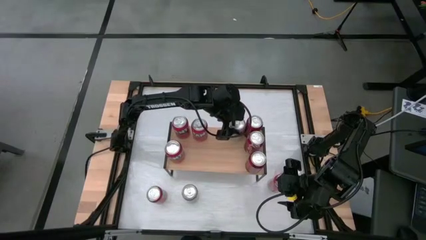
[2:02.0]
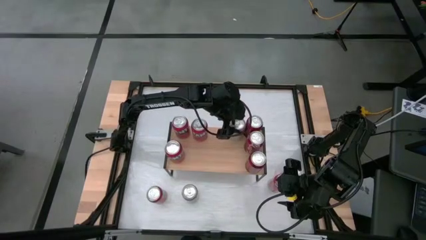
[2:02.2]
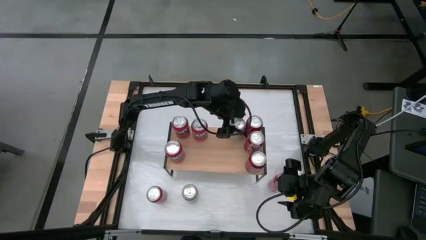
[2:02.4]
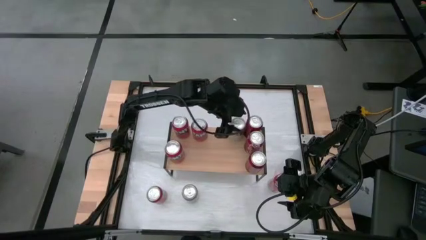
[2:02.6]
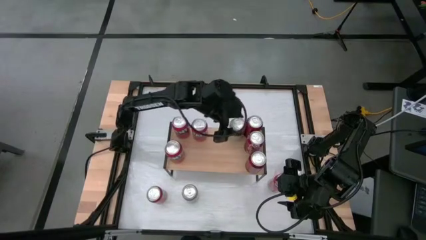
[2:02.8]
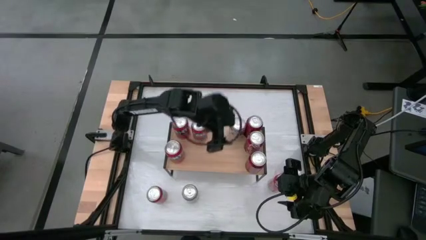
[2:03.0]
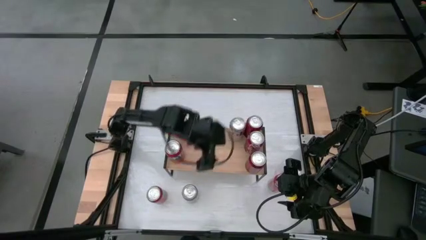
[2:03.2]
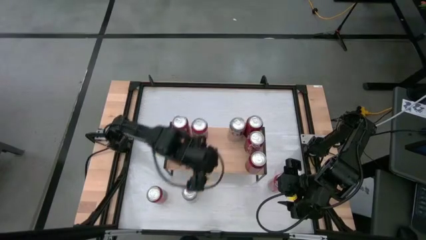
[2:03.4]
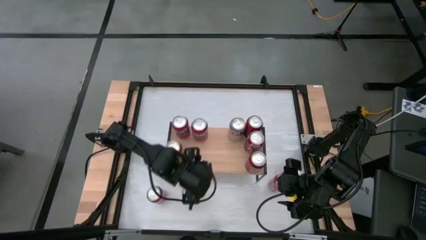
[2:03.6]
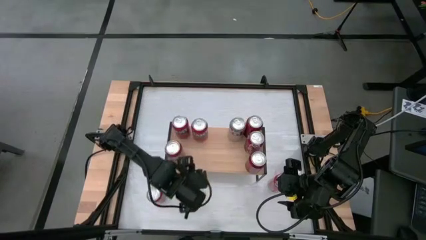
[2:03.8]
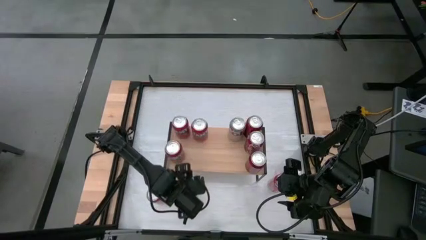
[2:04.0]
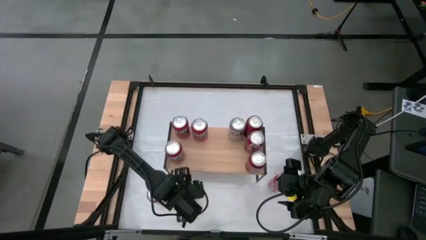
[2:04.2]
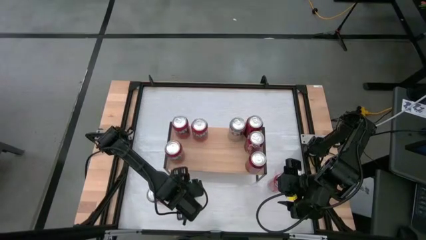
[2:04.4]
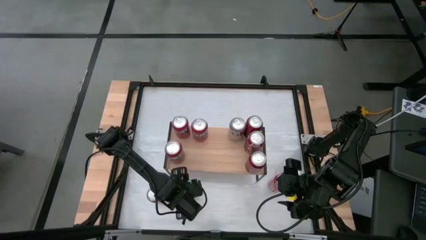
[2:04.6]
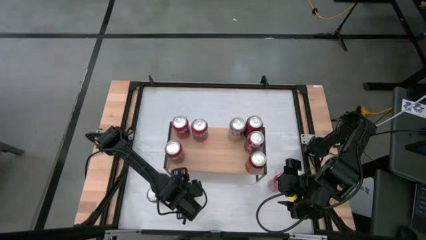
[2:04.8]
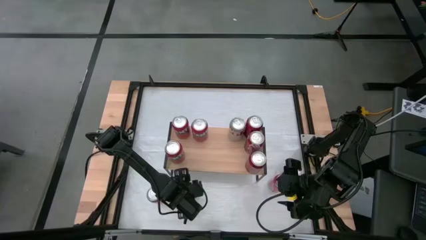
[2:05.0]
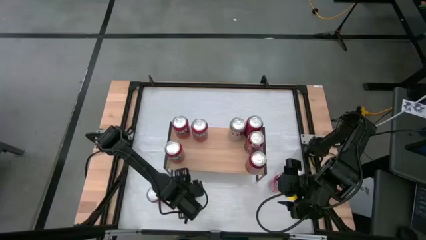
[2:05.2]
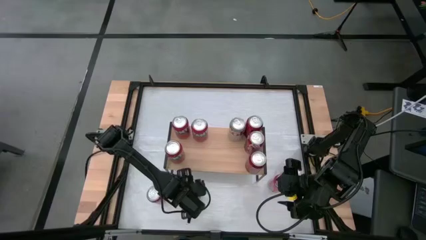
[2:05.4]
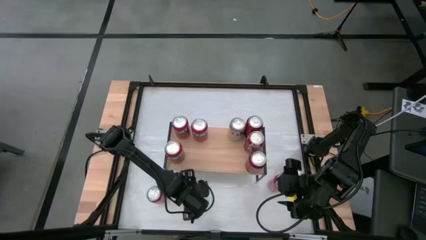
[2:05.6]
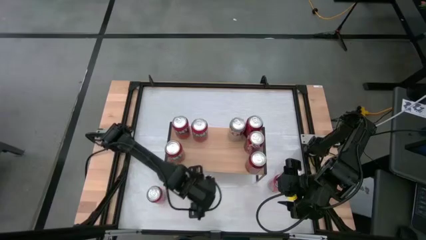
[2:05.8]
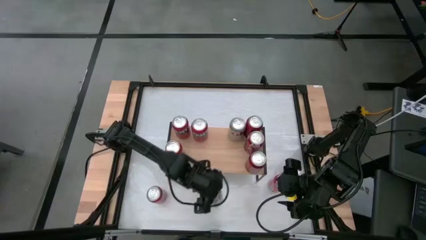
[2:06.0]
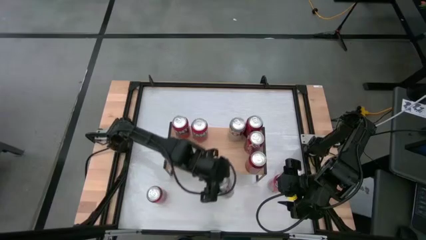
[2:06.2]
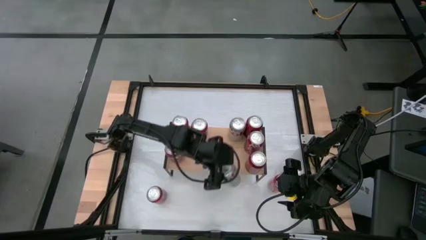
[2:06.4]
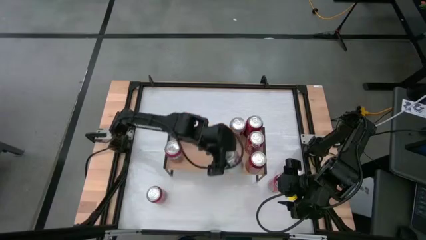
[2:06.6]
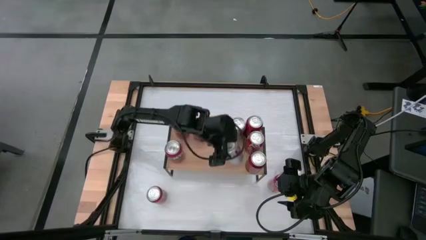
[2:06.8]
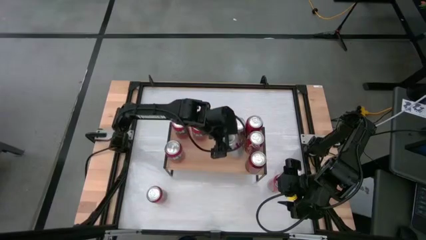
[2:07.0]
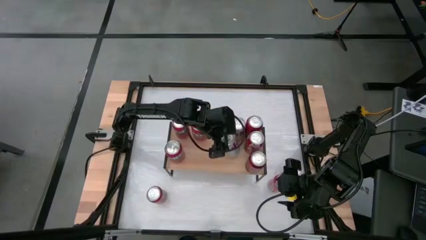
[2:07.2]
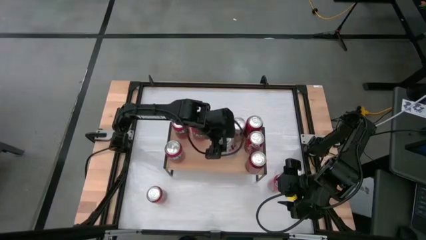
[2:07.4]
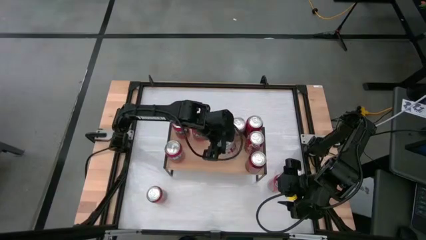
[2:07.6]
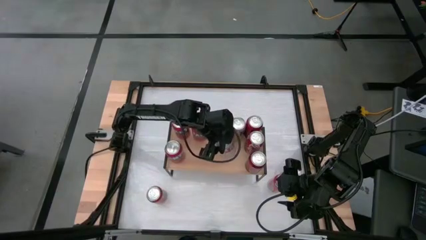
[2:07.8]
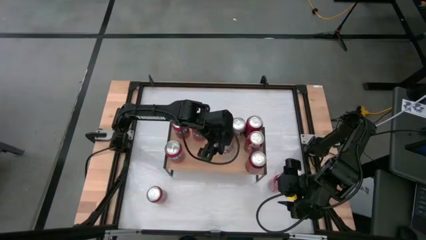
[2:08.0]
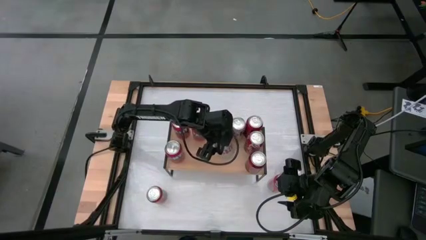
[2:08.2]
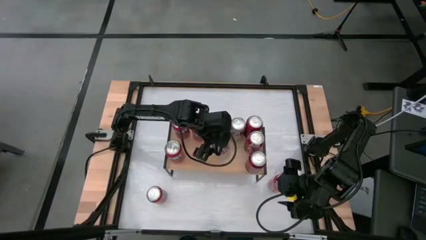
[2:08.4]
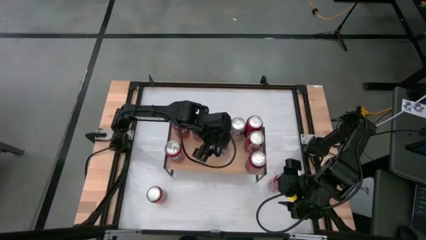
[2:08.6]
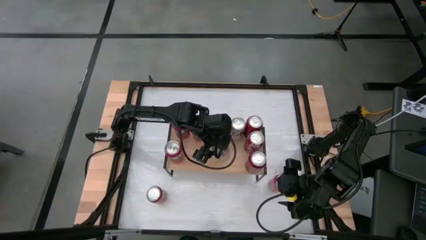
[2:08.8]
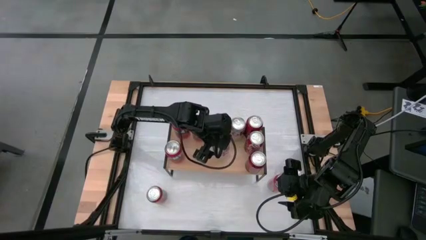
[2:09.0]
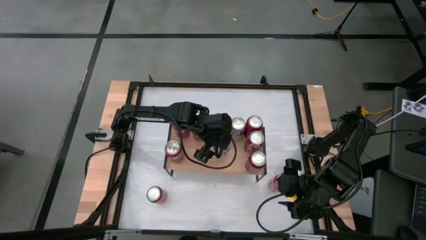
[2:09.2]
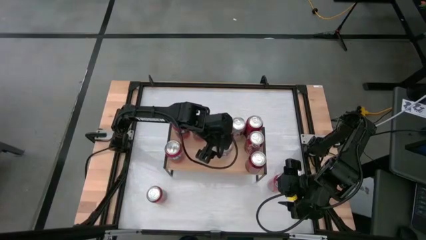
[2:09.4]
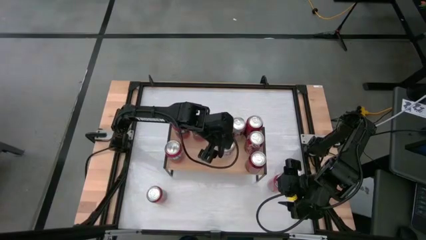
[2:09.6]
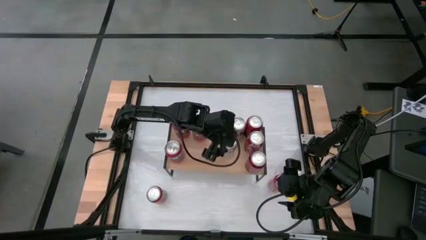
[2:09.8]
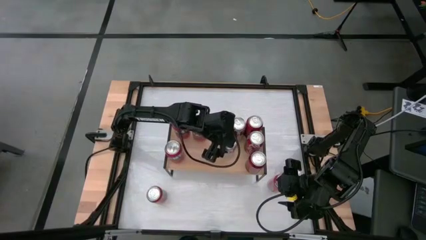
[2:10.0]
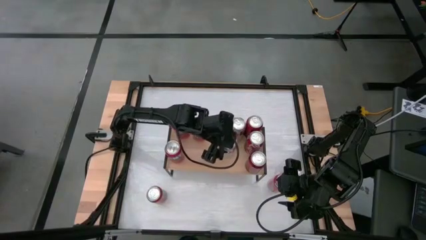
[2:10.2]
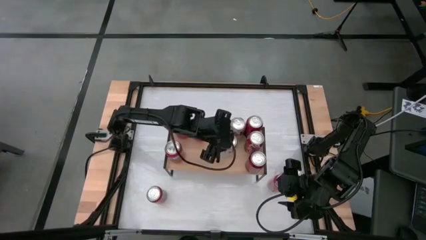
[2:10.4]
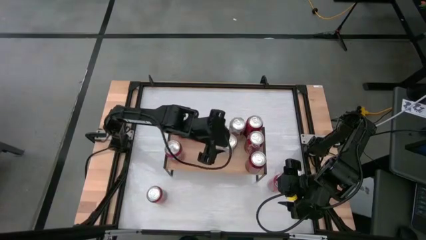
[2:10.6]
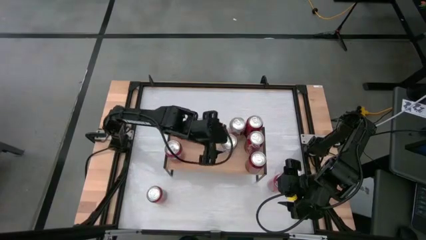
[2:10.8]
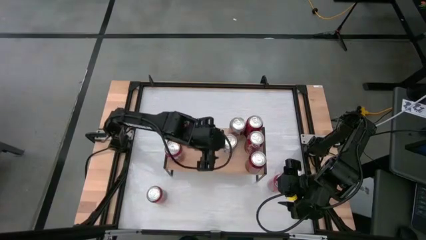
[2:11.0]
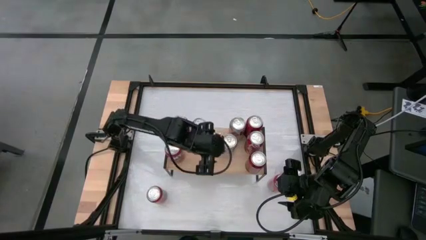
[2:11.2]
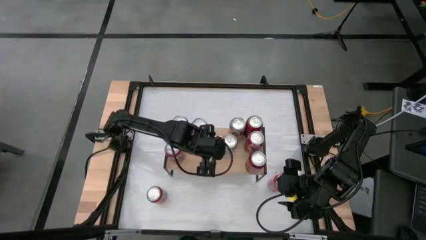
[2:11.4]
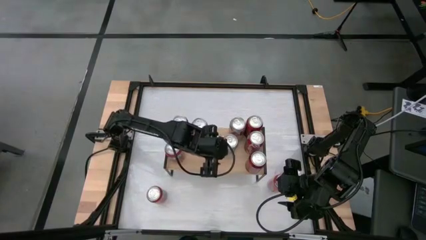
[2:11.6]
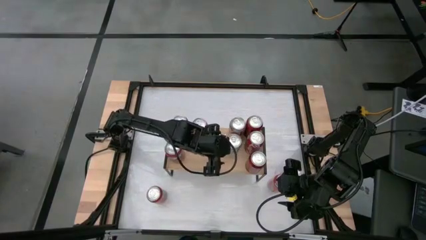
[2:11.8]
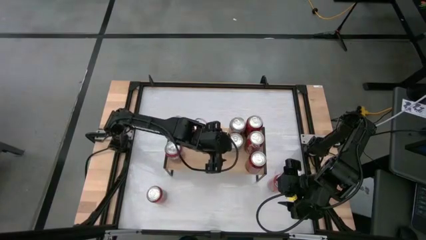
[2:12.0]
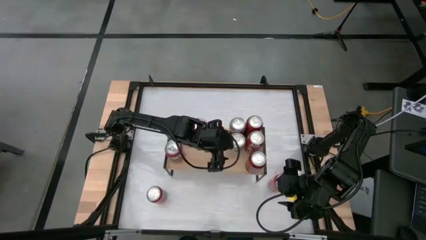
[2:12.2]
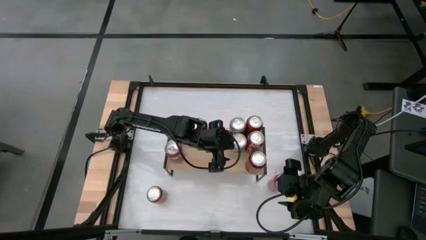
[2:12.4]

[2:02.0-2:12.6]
Task: Place canned beverage on shelf
Put the silver soda can on the shelf

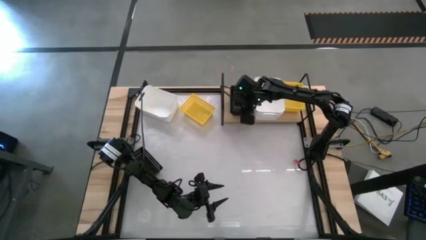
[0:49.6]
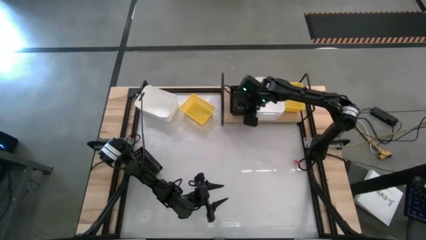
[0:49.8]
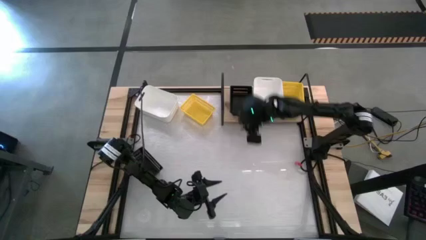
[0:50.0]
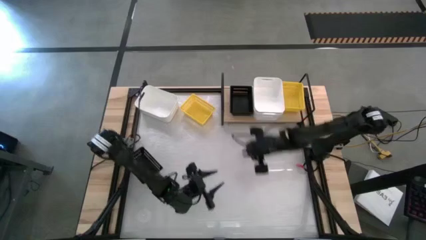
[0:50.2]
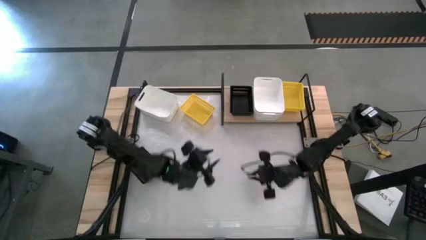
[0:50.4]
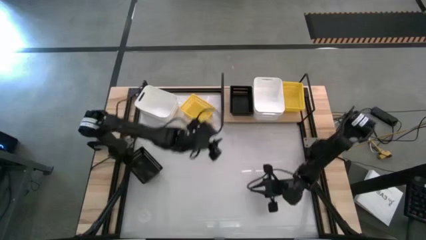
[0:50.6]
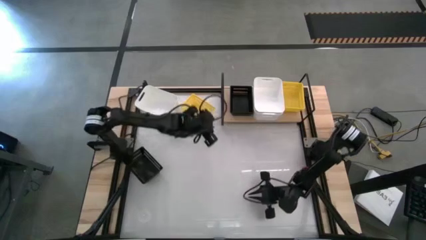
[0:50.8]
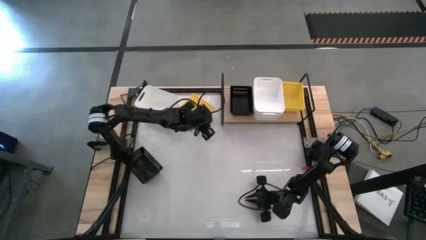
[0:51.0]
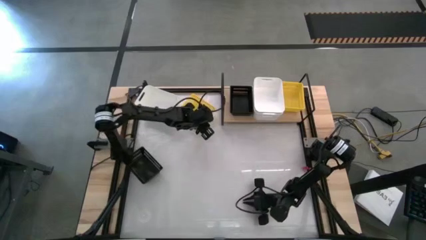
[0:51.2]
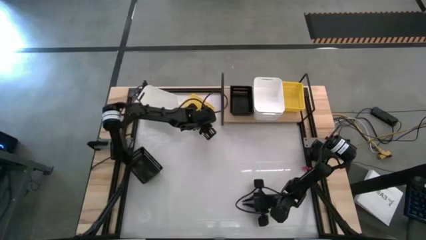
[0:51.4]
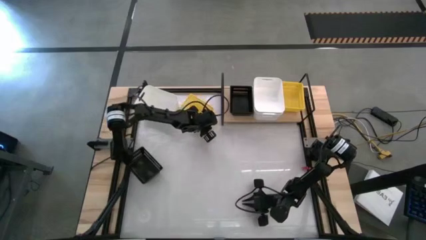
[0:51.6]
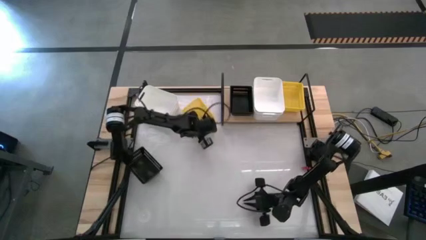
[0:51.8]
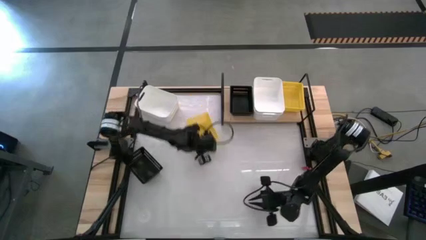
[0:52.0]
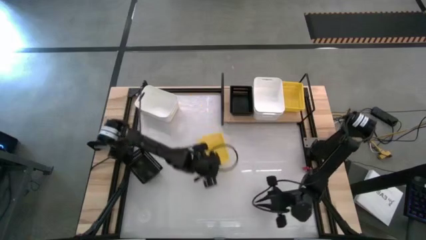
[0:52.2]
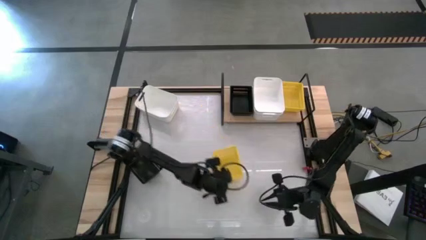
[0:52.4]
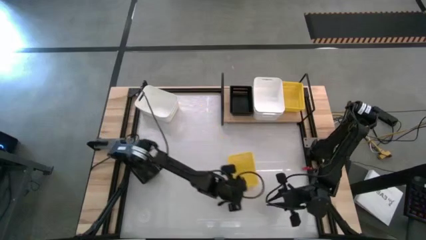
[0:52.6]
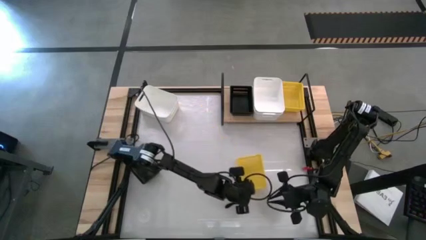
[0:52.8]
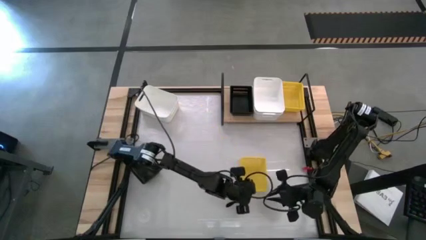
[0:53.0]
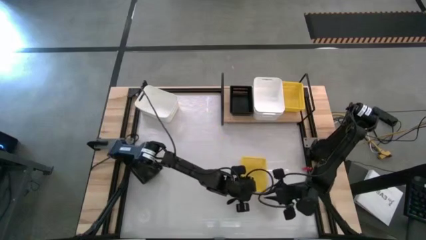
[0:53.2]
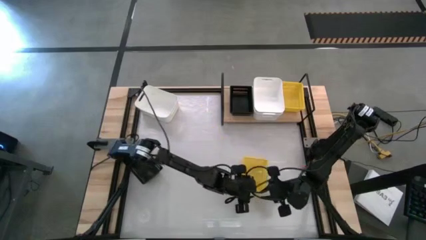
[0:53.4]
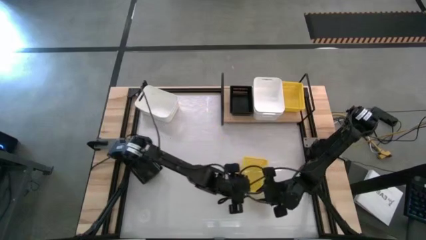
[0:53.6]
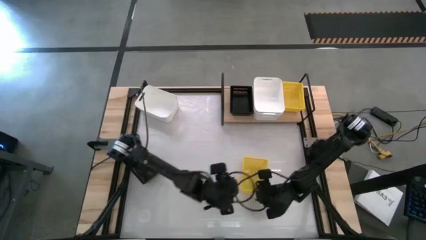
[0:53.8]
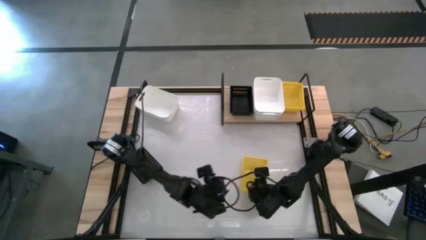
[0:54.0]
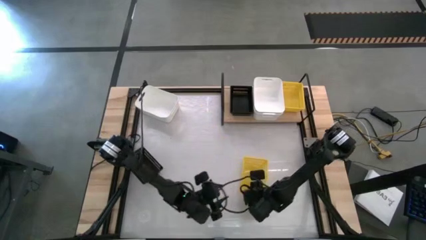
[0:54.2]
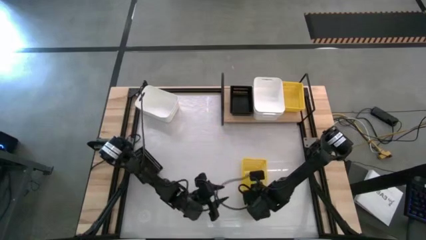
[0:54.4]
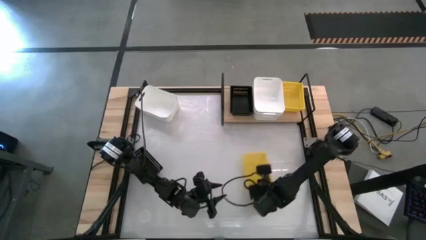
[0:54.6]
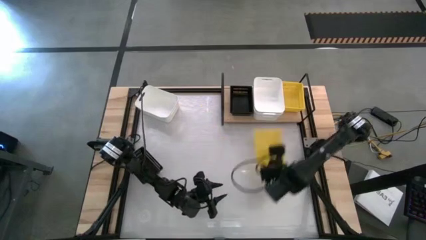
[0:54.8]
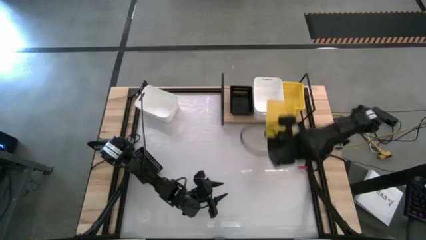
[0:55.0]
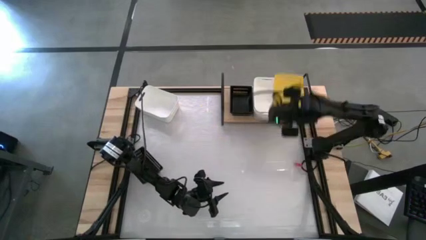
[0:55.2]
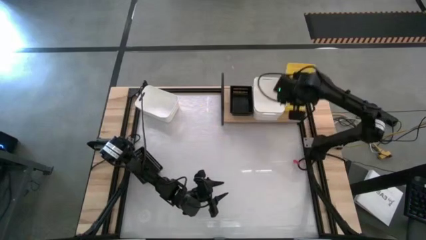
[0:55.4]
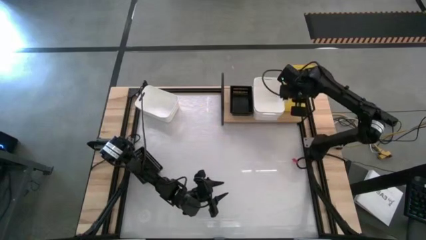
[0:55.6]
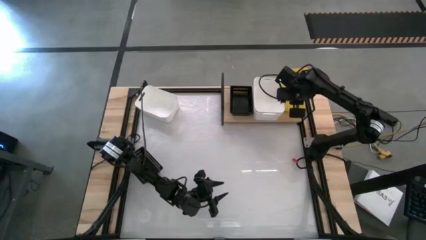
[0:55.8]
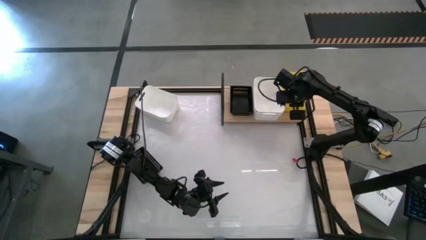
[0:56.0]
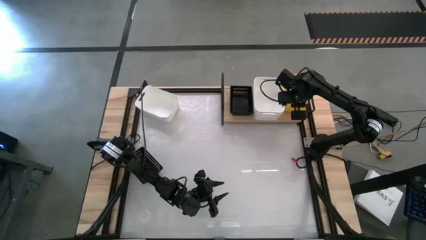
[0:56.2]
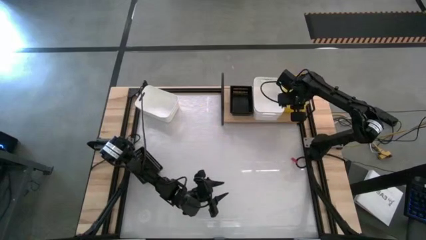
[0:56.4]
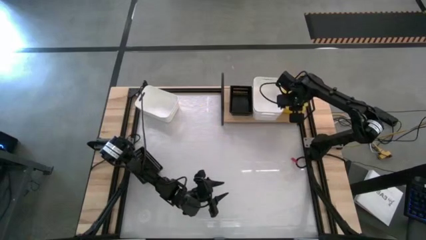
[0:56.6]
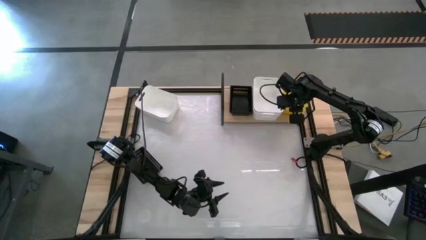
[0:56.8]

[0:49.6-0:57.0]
Task: Stack baskets on shelf by color
Stack the yellow bin into the yellow bin on the shelf
